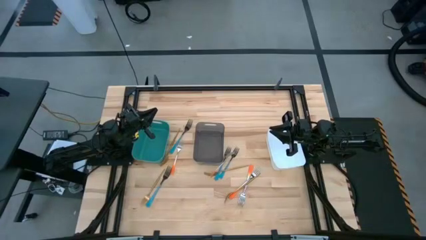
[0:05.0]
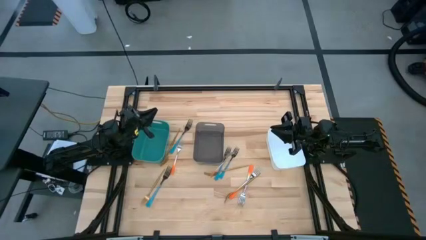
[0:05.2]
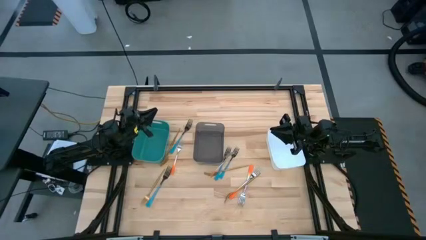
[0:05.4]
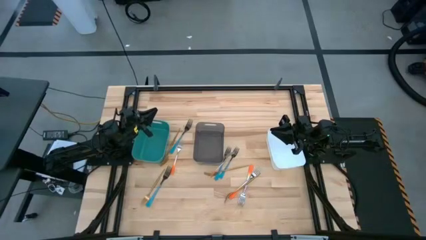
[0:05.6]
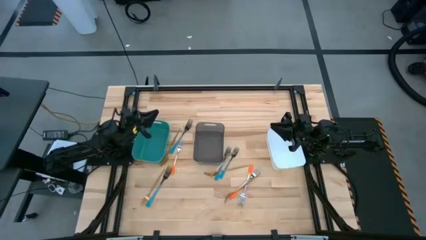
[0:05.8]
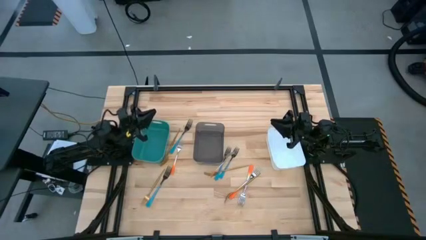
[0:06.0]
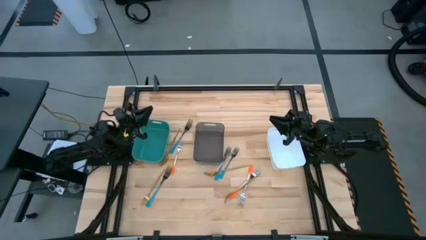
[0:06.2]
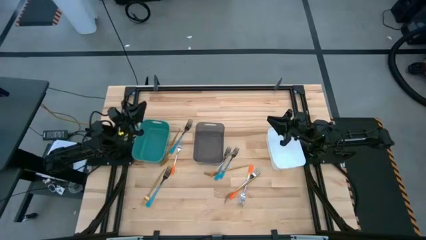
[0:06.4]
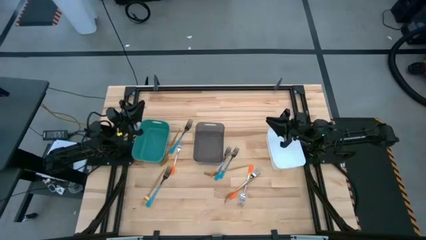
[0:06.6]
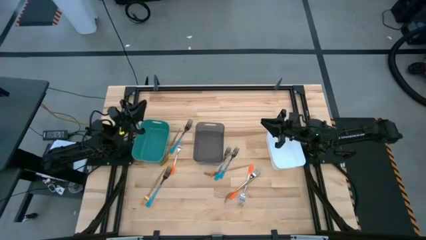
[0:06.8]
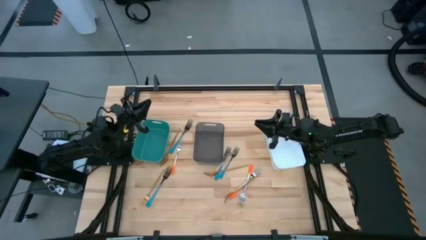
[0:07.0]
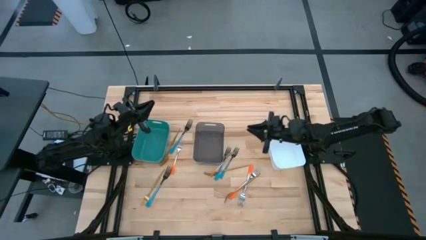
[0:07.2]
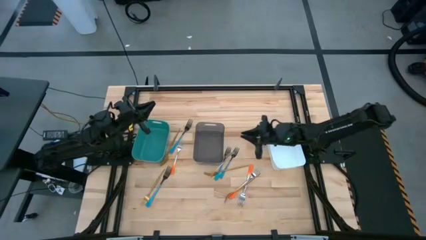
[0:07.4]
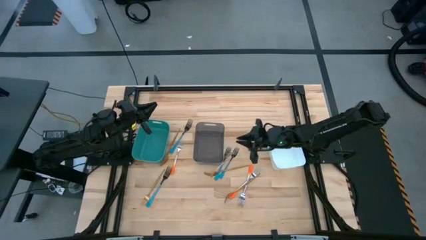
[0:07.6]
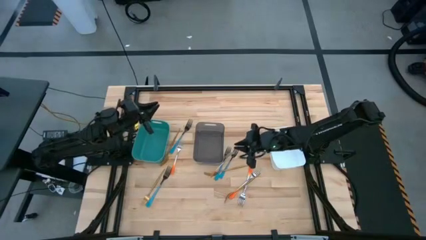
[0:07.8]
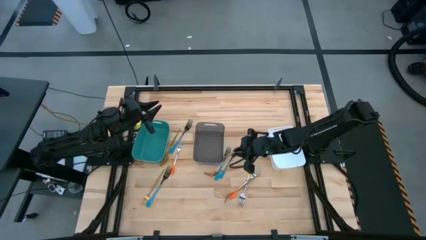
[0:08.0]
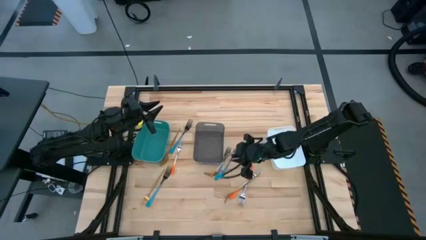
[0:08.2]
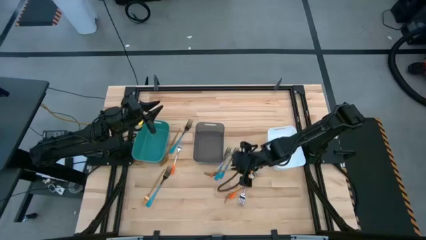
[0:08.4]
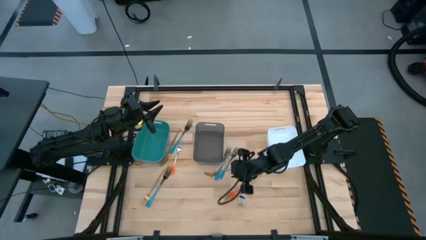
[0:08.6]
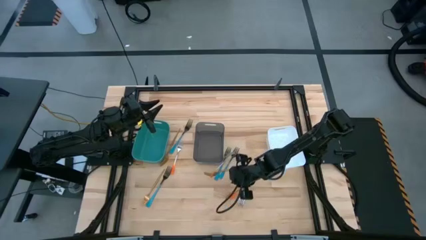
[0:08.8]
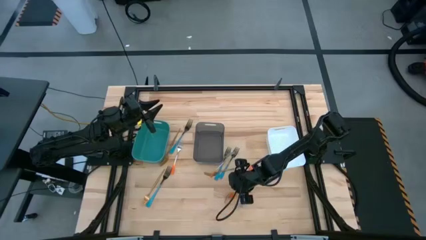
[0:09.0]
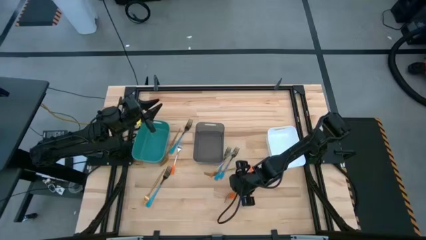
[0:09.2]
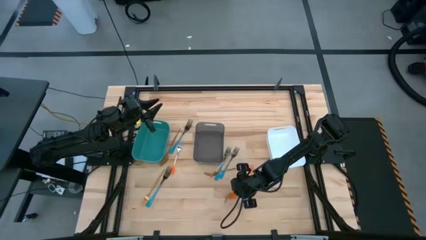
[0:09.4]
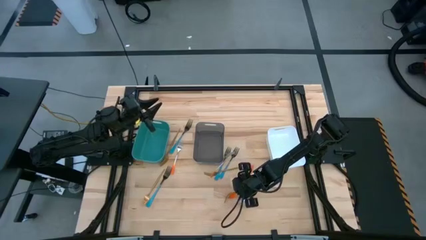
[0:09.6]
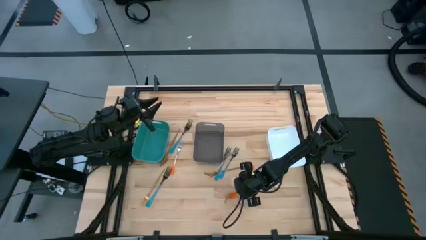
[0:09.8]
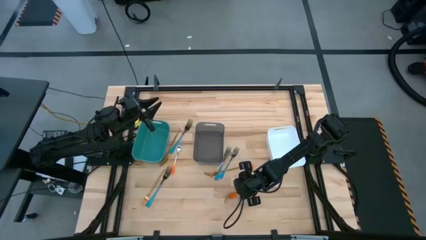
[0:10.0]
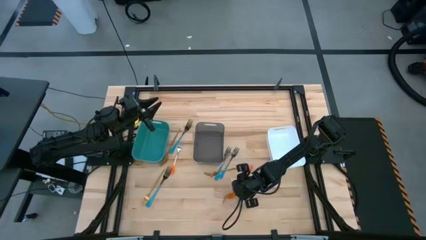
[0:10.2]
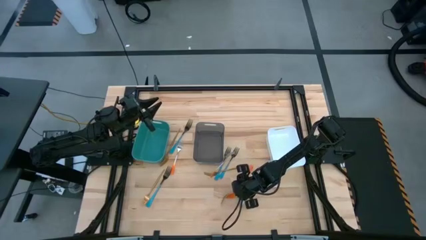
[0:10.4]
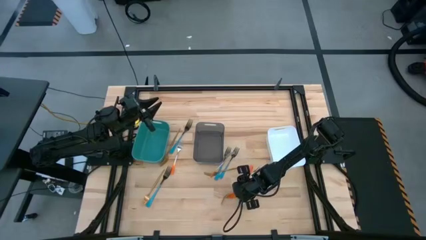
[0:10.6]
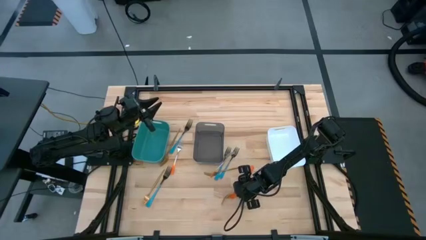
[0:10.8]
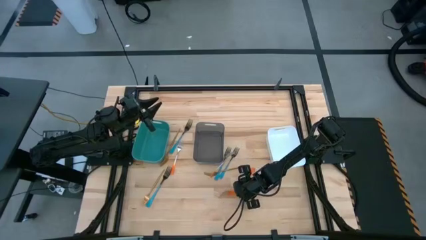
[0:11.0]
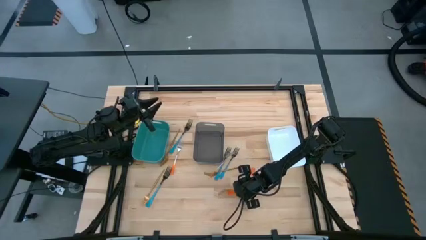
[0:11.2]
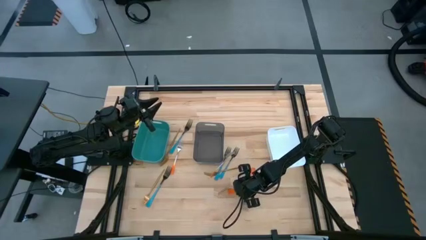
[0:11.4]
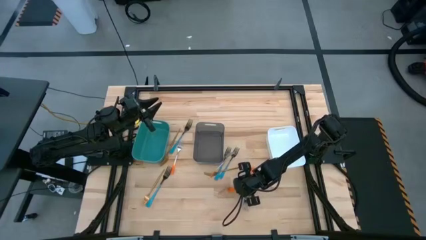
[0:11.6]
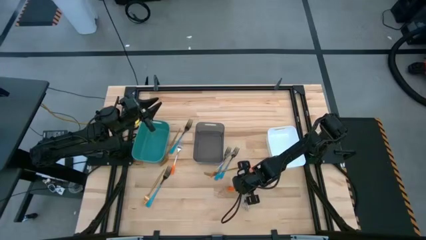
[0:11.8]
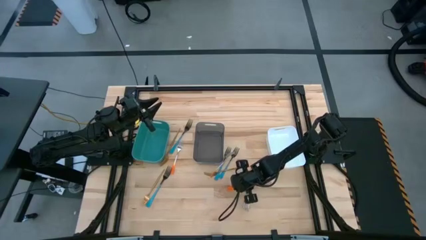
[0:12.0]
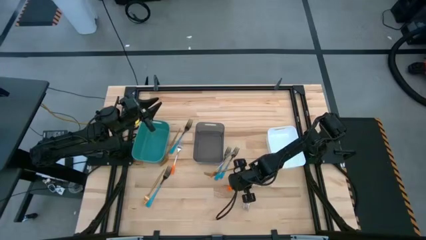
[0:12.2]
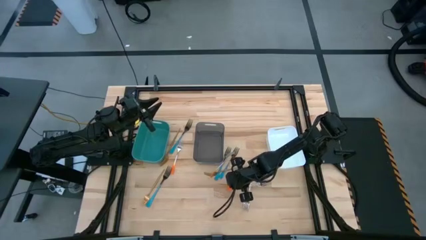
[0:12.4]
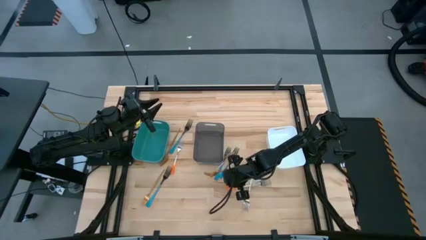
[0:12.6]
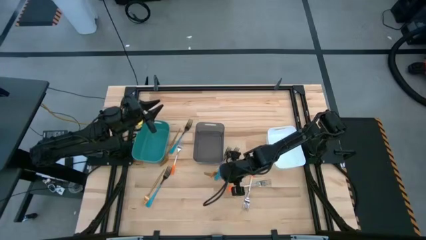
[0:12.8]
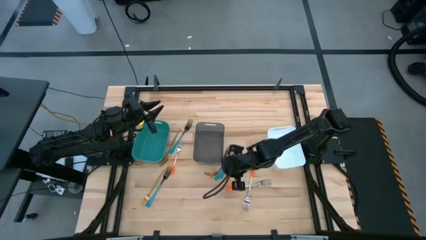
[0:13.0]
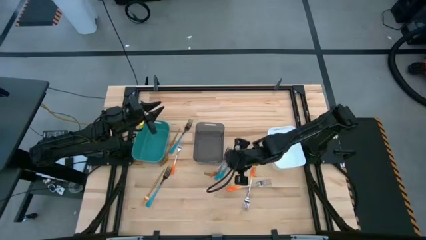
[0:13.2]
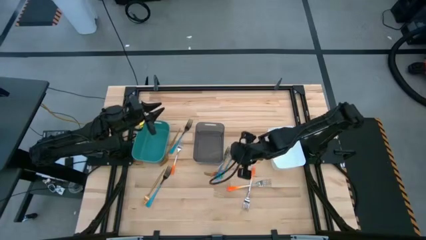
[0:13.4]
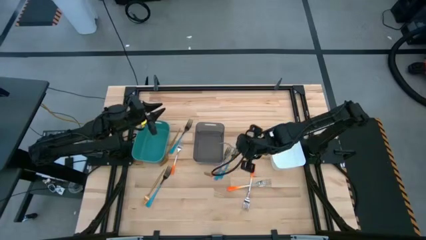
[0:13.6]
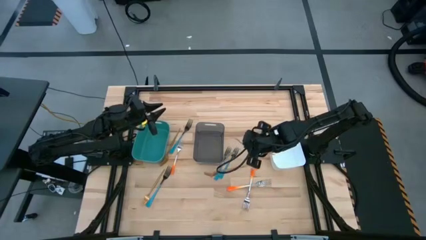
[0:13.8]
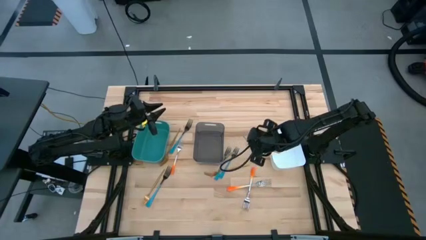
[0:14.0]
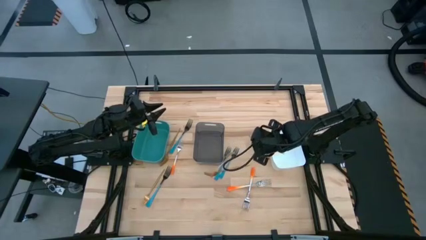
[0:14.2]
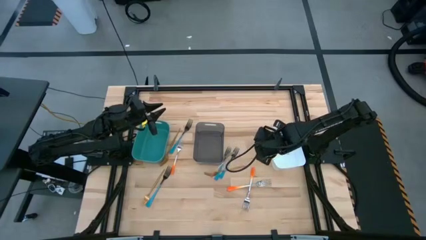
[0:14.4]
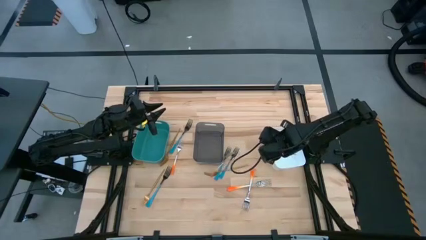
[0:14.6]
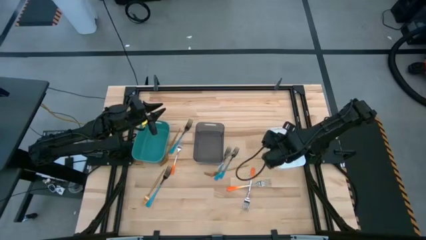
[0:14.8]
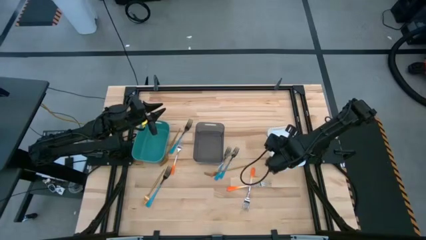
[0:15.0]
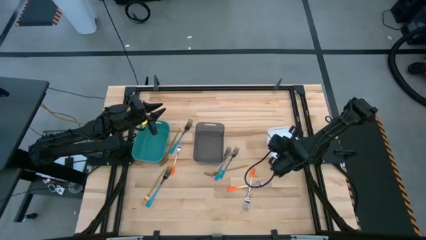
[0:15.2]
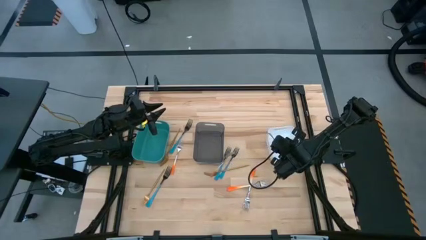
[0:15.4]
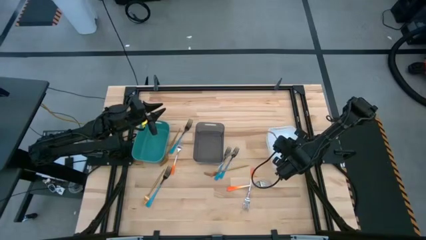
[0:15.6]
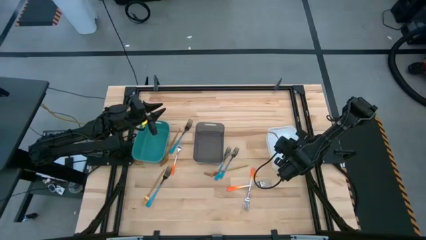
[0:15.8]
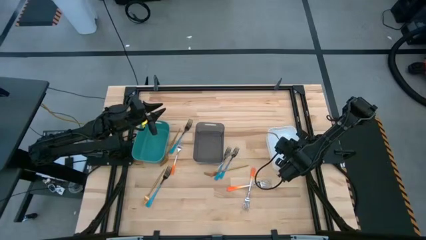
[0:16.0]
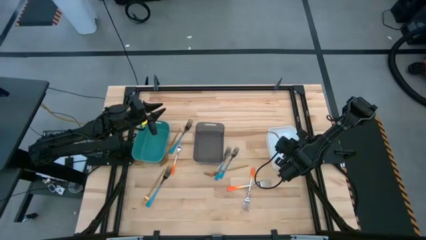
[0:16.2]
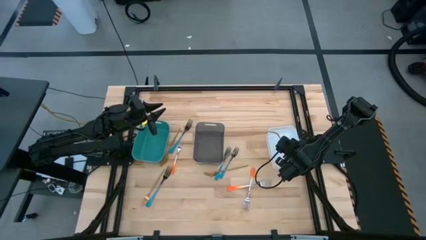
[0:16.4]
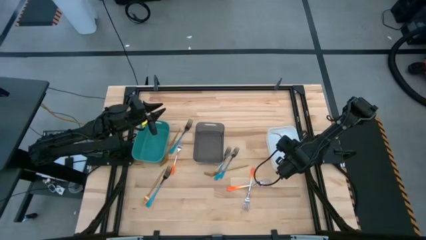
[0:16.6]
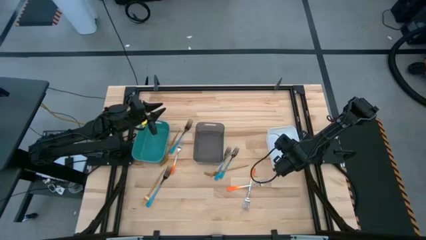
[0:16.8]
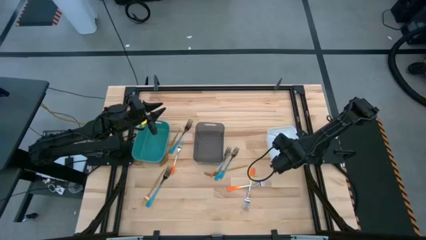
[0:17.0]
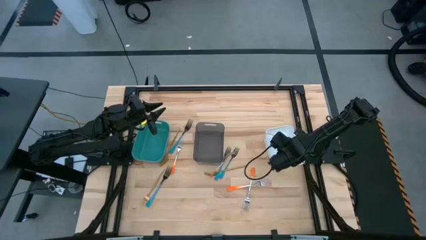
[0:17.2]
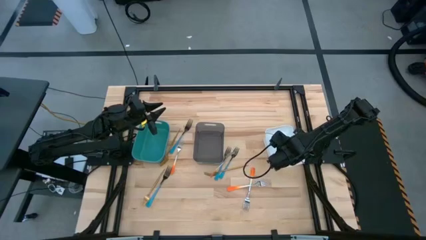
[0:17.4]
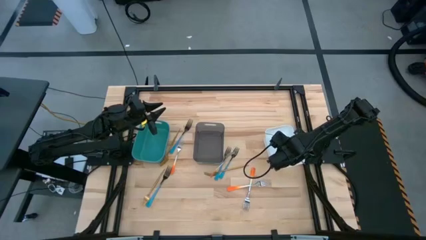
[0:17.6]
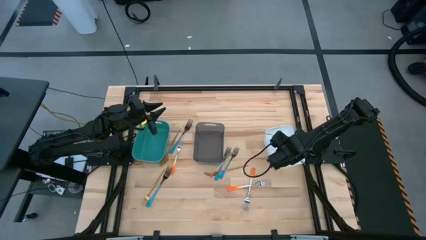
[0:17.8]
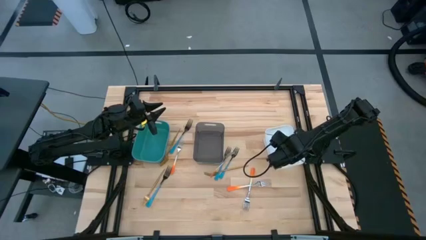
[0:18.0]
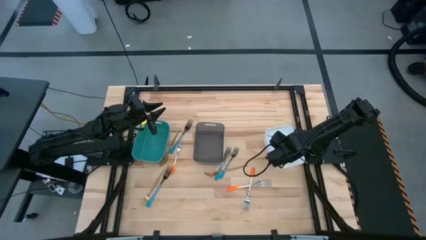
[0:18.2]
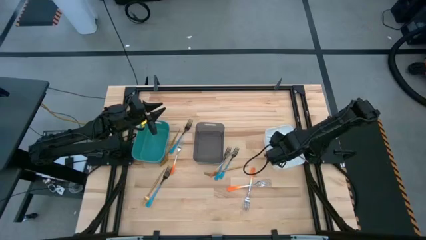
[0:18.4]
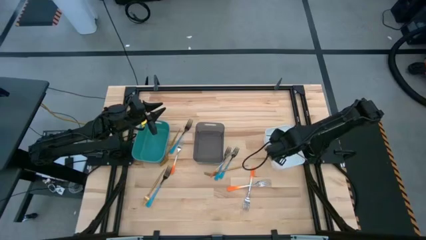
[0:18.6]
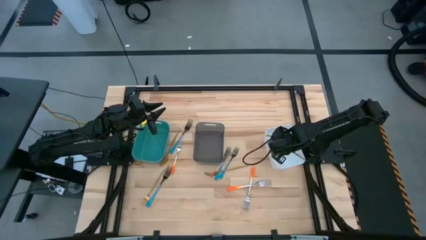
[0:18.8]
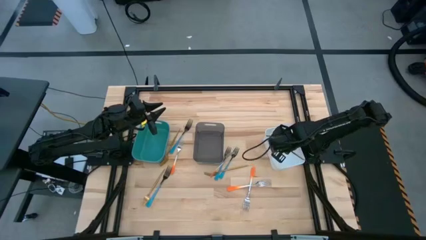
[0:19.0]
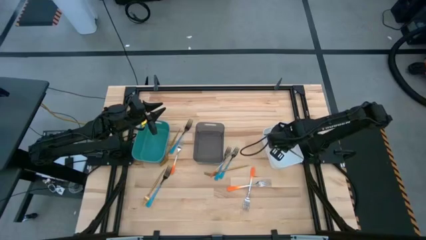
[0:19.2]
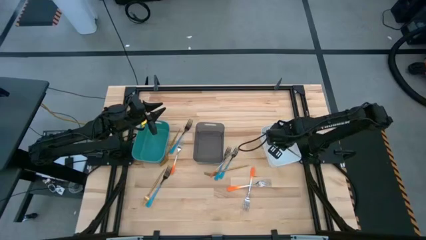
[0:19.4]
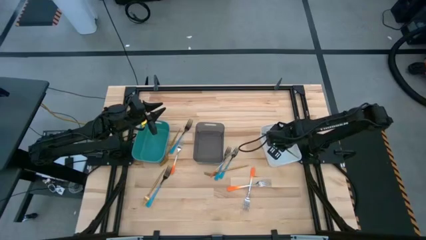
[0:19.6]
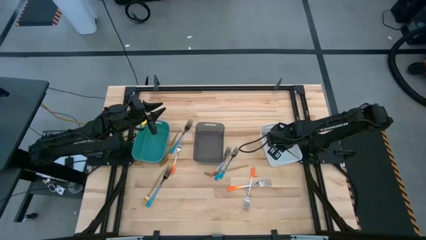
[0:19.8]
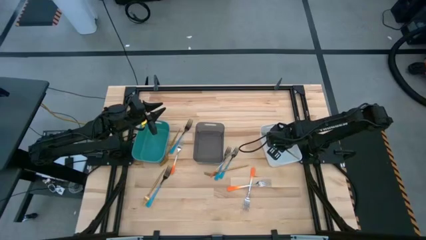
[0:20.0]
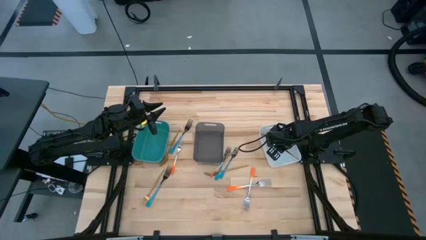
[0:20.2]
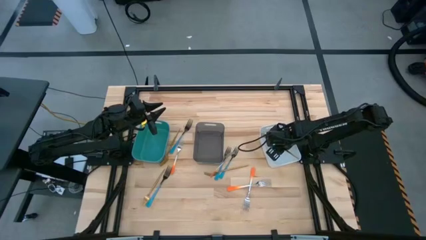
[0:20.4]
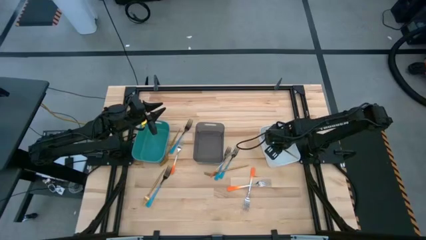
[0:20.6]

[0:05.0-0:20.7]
Task: Sort silverware by color (type)
Put the gold fork into the white bin
